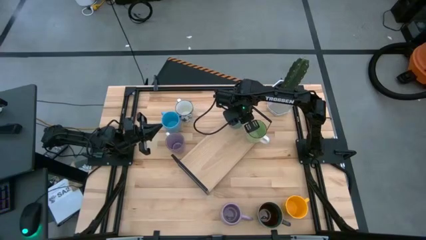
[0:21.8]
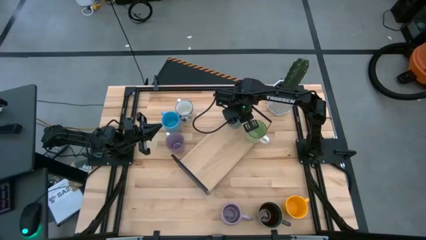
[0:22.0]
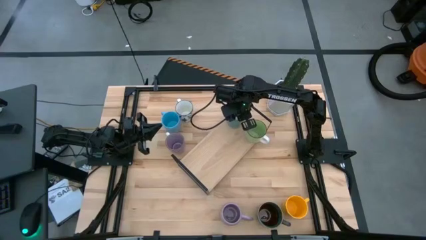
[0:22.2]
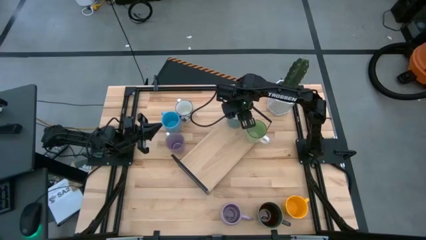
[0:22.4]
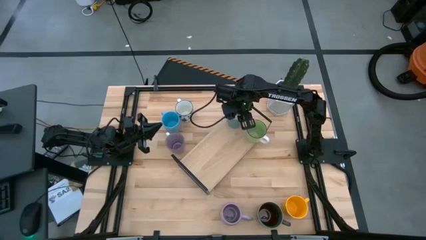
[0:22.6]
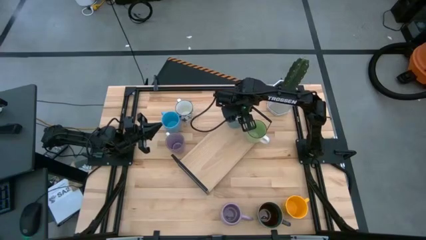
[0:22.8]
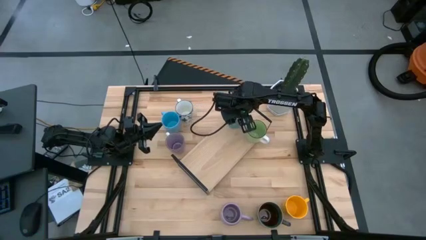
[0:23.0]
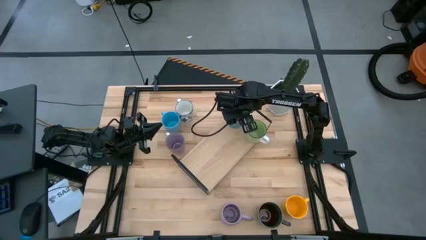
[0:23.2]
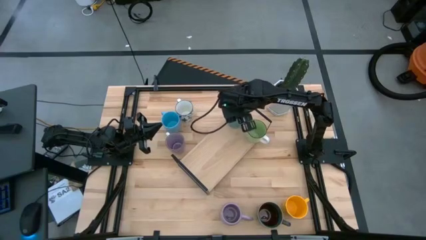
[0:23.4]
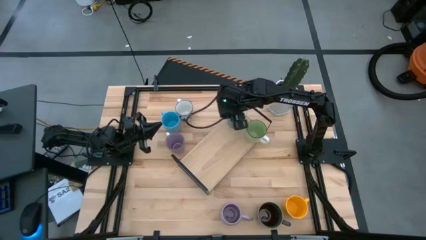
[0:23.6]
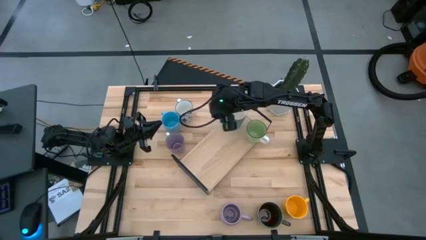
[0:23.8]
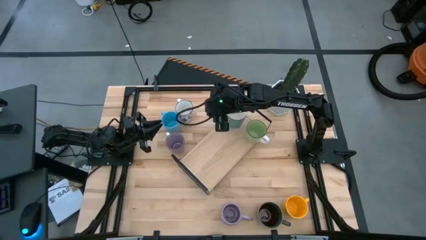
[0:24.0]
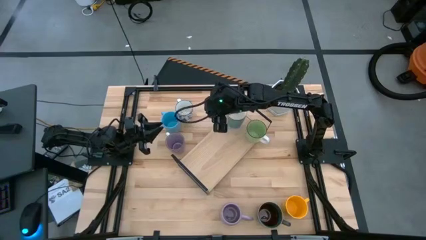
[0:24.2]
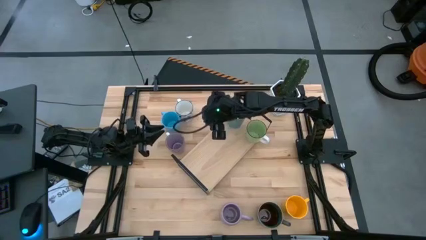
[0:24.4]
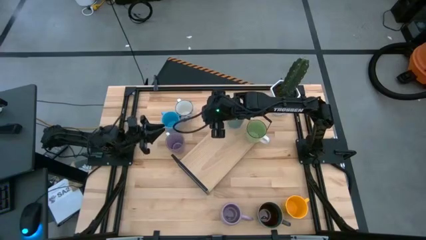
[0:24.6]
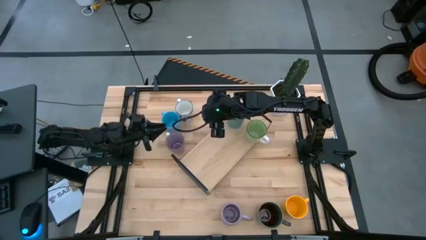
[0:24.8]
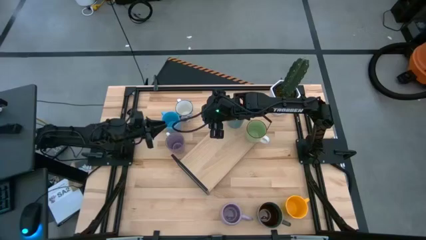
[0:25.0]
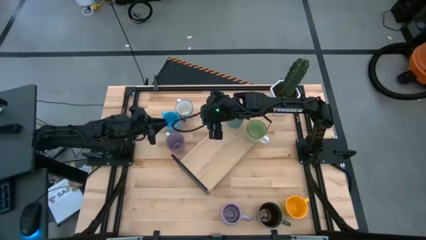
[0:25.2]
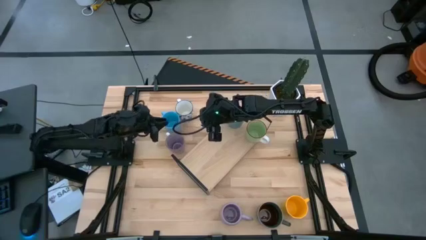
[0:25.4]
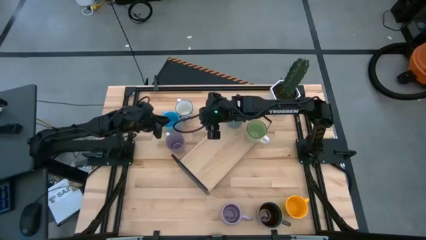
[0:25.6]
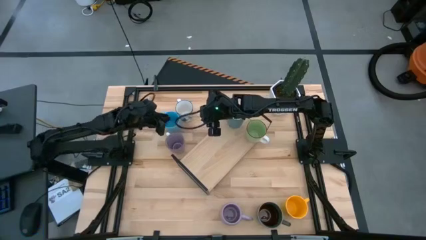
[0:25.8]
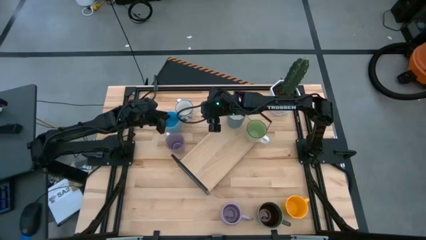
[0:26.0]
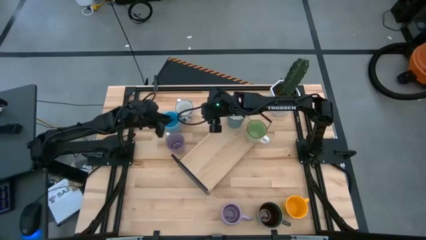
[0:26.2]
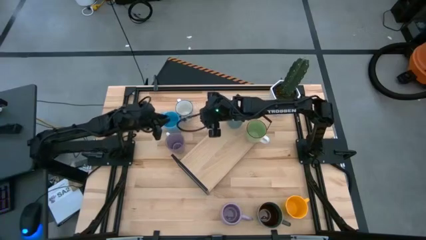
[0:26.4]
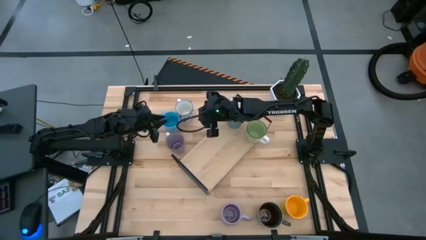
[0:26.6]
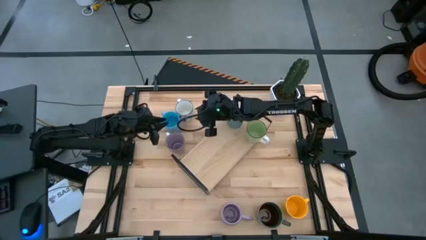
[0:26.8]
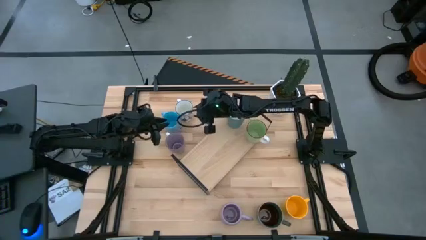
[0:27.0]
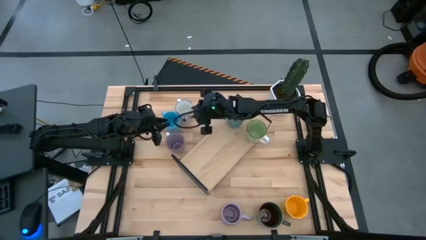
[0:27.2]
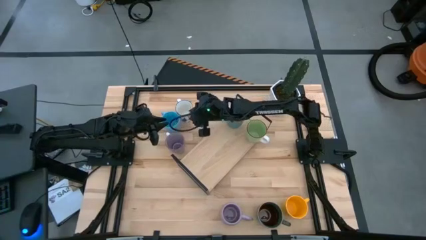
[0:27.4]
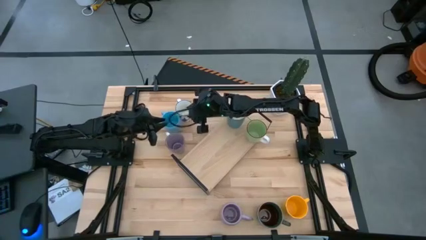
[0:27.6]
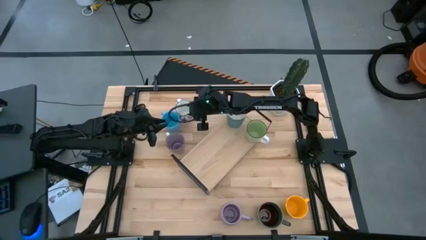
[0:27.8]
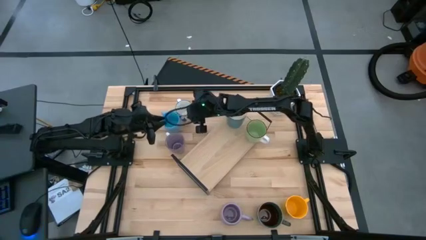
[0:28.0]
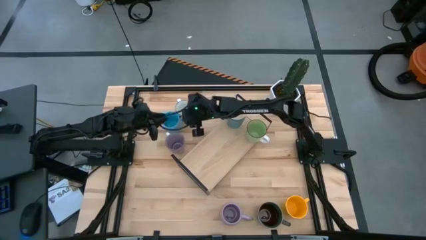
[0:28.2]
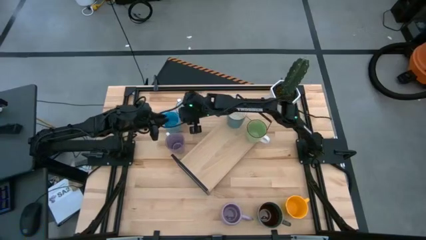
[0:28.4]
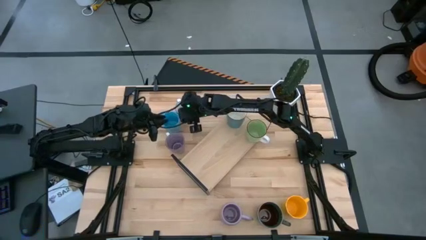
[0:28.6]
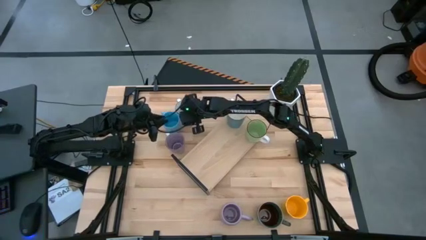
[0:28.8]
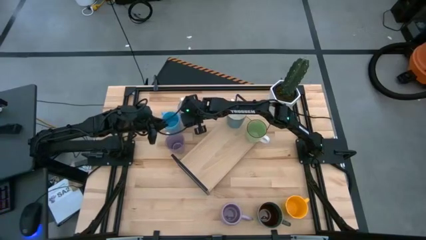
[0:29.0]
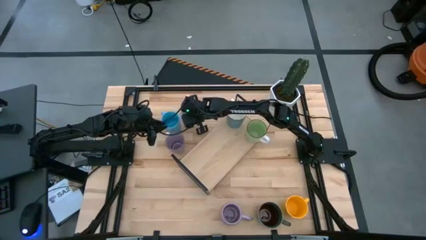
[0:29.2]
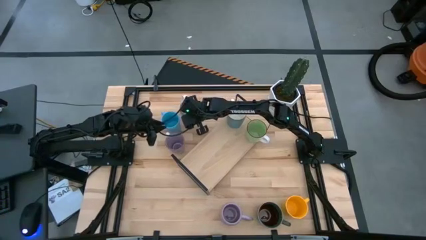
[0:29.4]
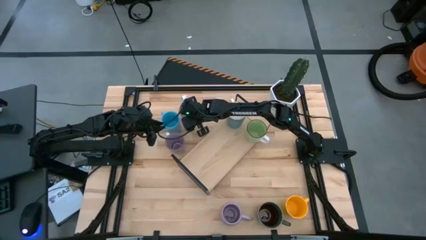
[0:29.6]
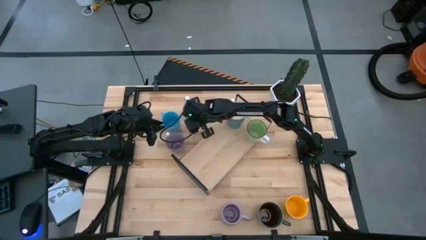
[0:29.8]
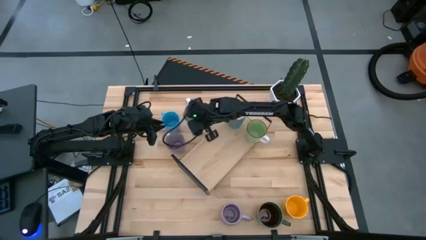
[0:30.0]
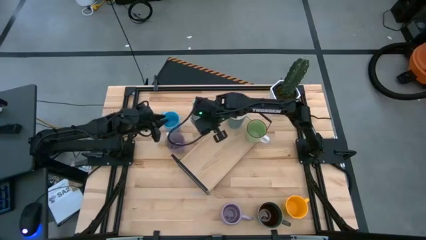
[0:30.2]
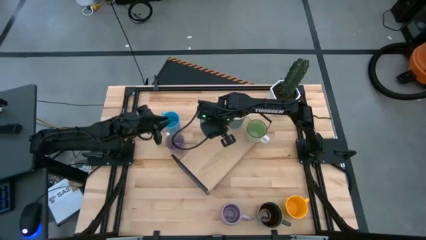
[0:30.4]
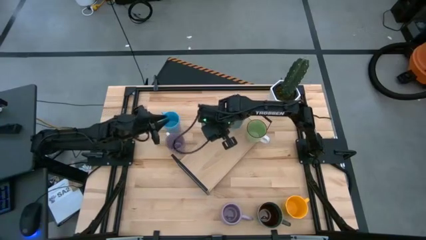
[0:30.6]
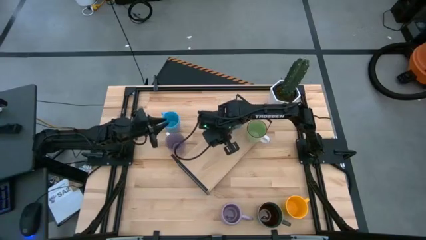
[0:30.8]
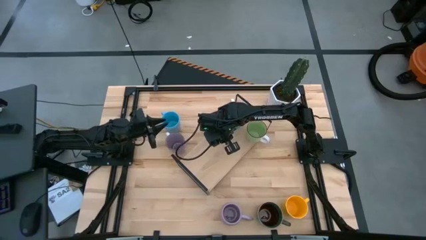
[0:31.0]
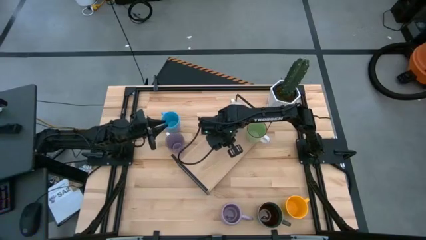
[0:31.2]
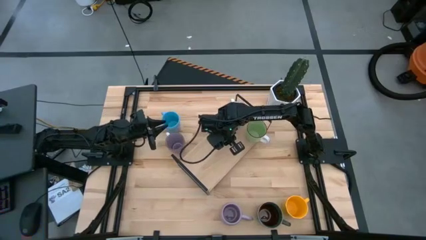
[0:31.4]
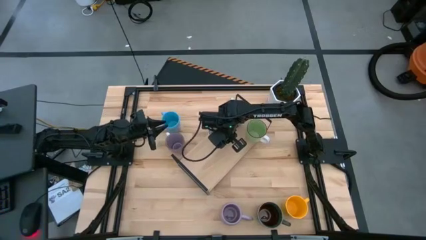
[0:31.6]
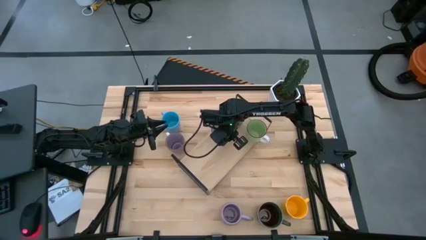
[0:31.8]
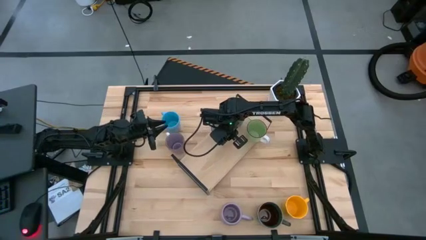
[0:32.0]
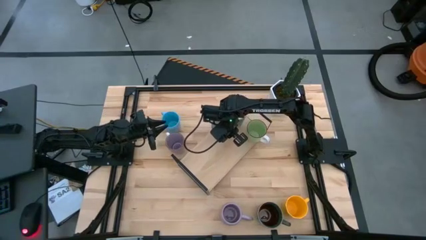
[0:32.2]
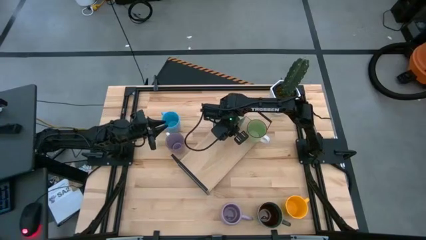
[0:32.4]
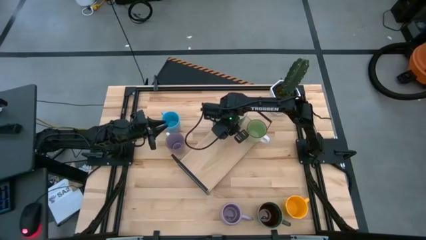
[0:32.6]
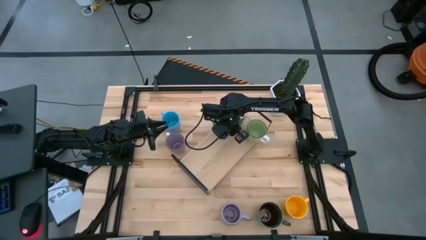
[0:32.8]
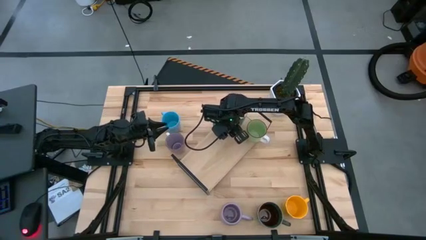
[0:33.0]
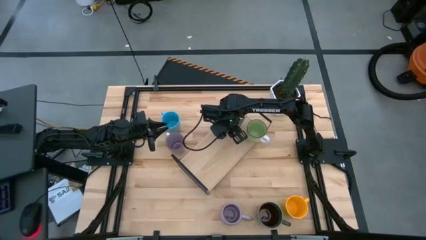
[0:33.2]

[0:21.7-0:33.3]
Task: Place coffee mugs
Put the white and blue cup on the shelf

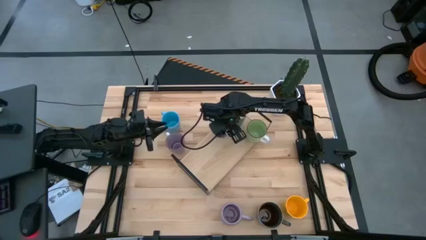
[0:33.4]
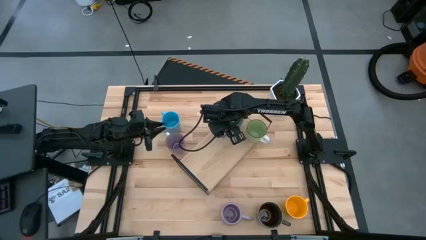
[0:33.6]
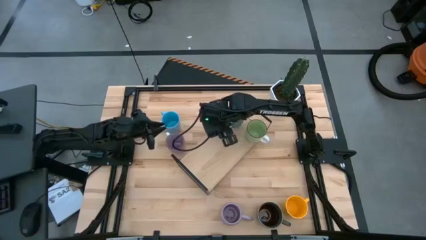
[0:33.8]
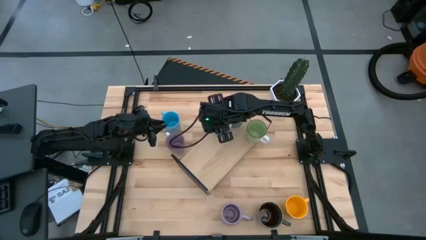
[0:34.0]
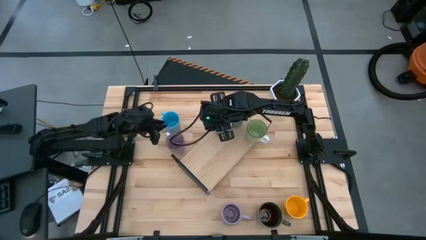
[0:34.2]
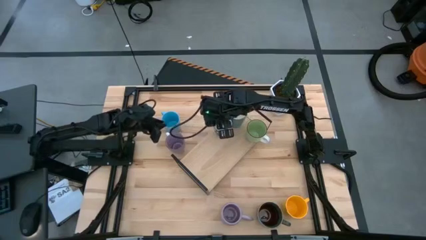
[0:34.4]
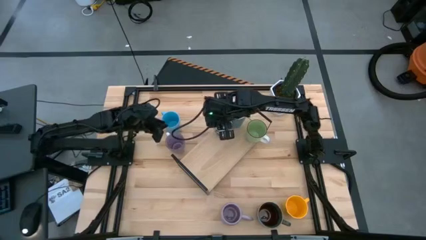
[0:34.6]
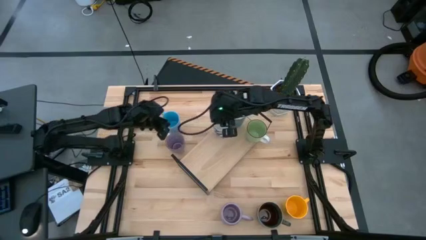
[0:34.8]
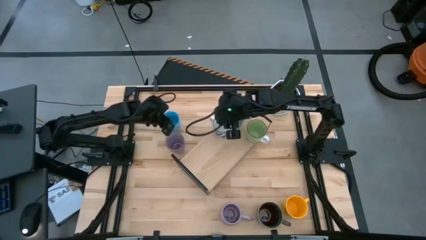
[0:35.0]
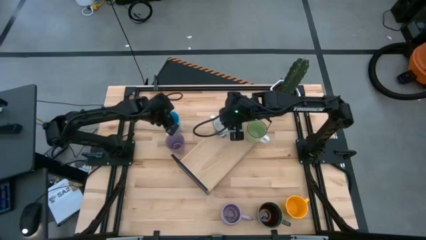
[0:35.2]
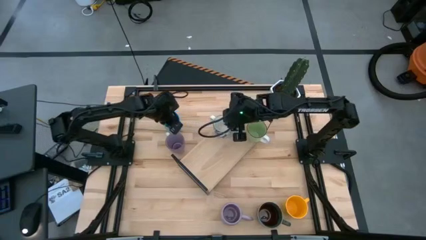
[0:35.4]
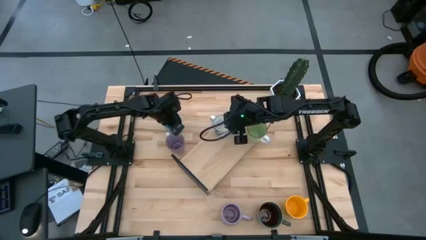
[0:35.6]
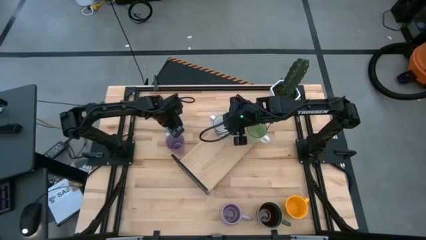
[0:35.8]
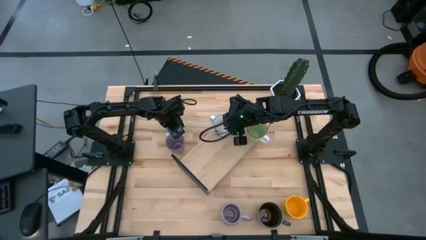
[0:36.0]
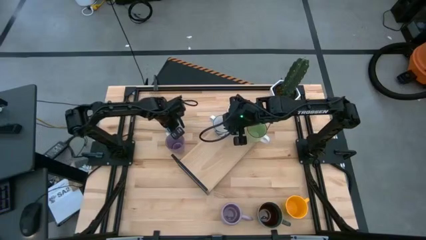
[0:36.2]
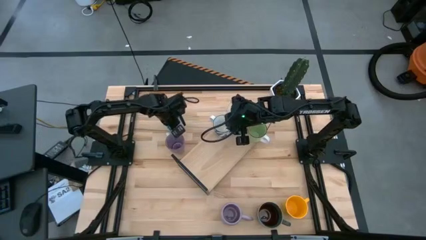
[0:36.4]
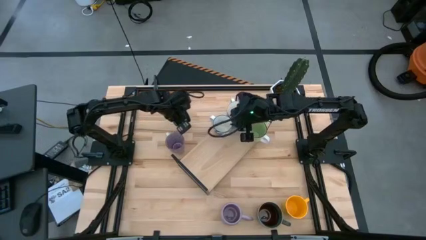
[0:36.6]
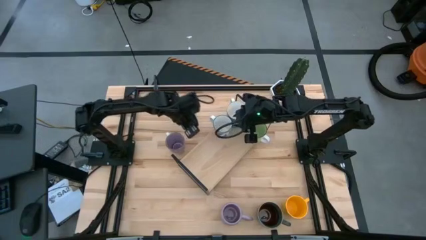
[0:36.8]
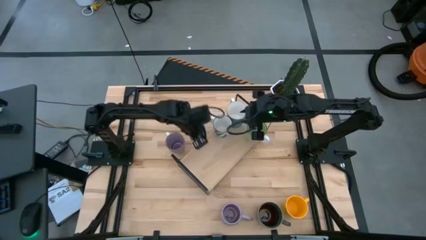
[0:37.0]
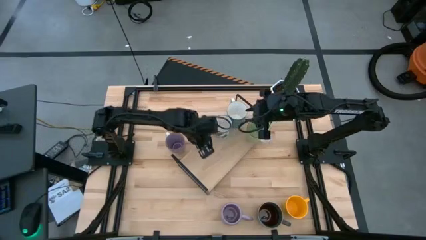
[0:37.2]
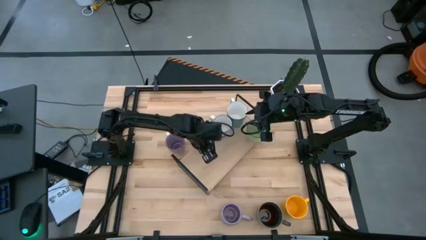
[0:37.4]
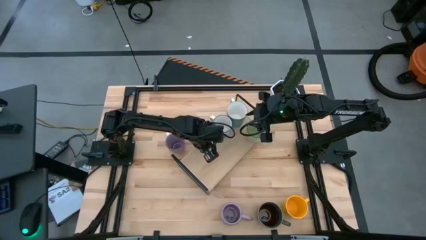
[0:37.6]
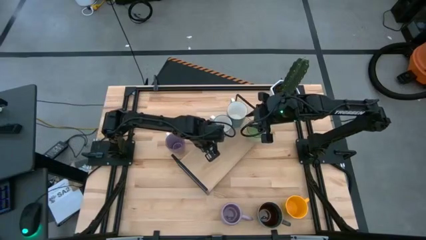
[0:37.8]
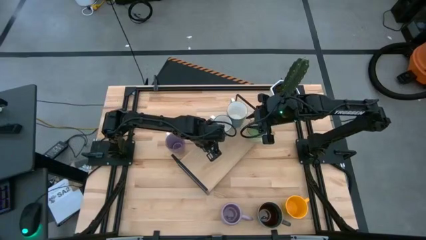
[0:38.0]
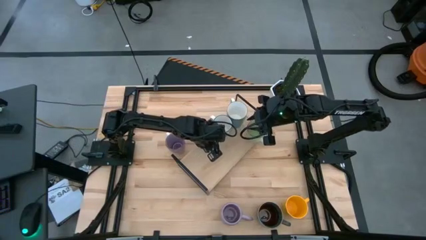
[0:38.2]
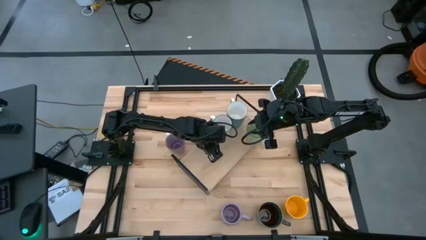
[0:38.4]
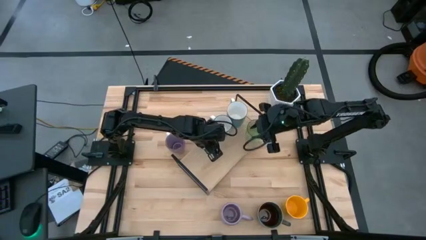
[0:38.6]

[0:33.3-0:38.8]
Put the light blue cup on the shelf
